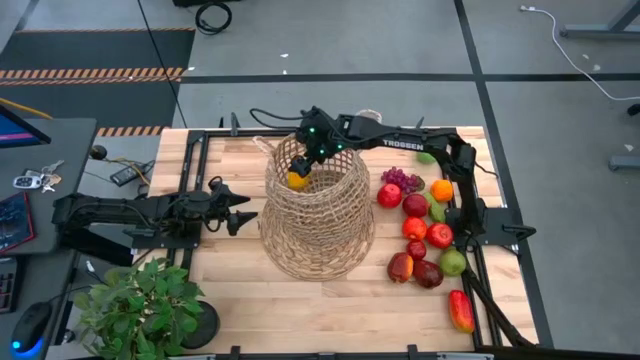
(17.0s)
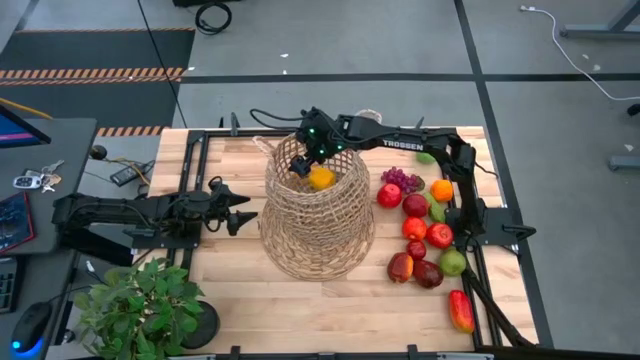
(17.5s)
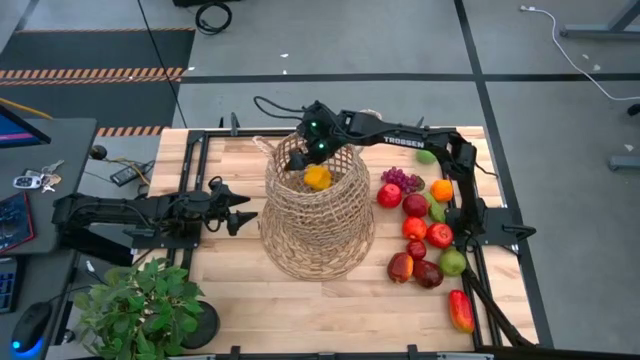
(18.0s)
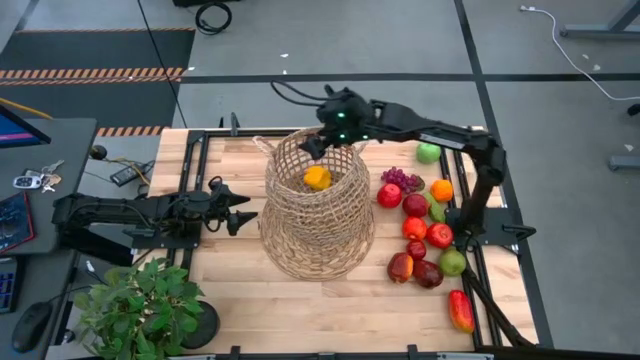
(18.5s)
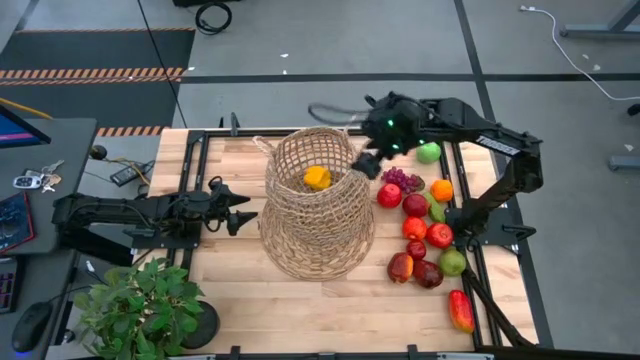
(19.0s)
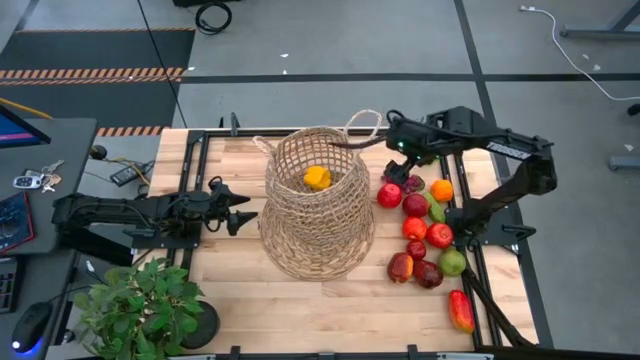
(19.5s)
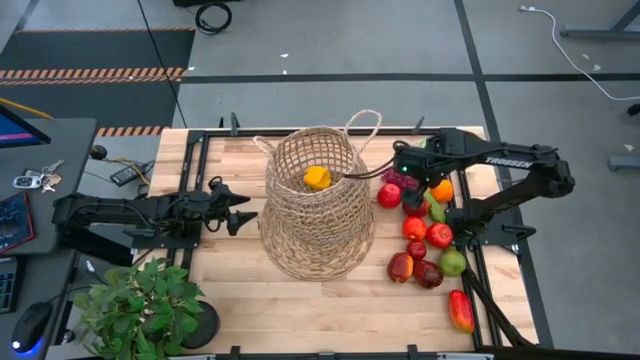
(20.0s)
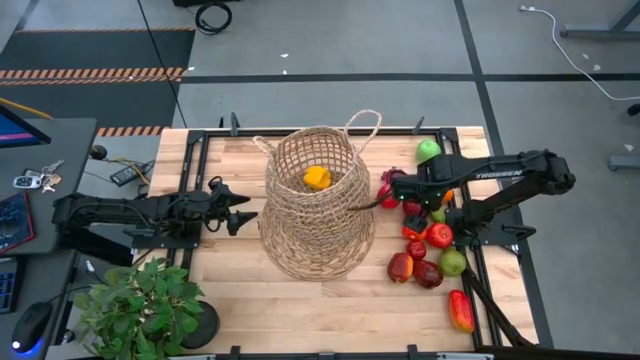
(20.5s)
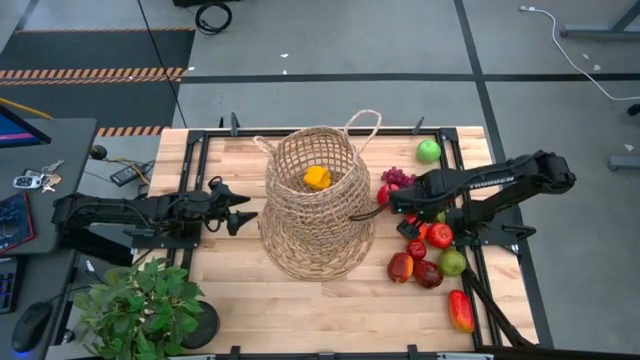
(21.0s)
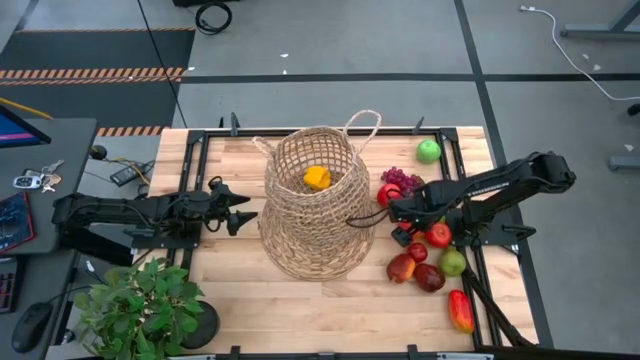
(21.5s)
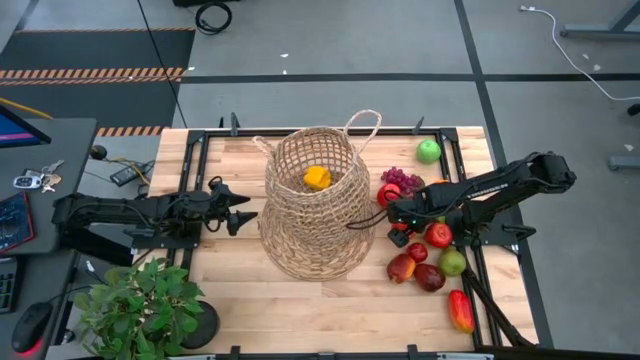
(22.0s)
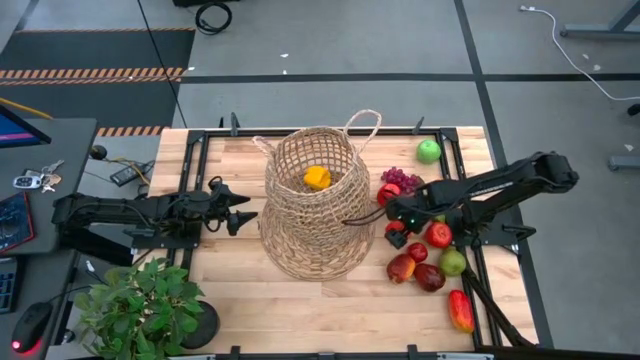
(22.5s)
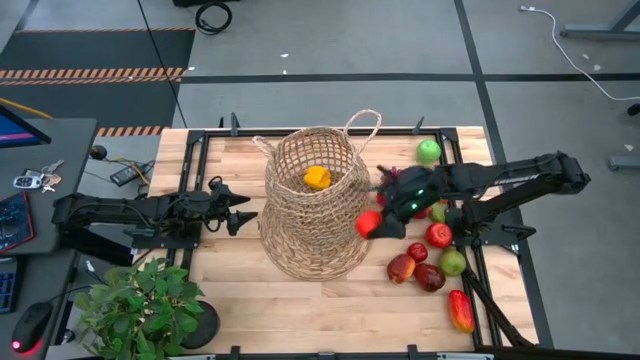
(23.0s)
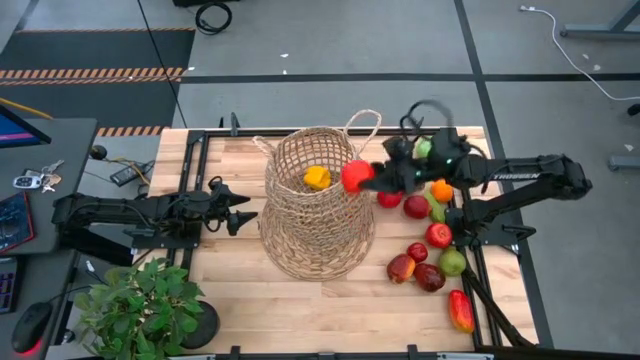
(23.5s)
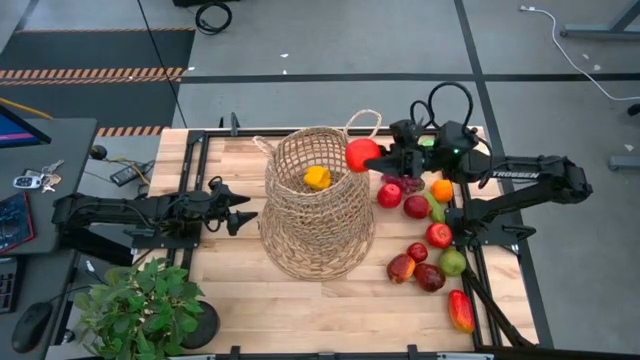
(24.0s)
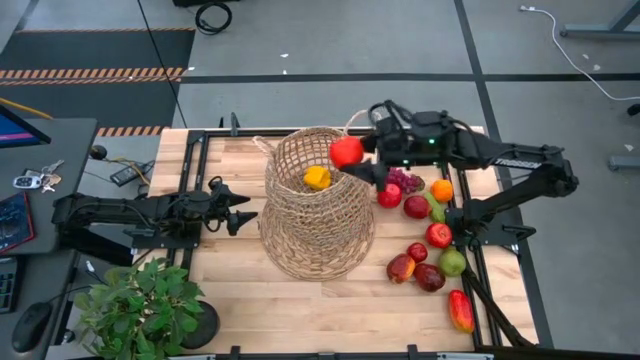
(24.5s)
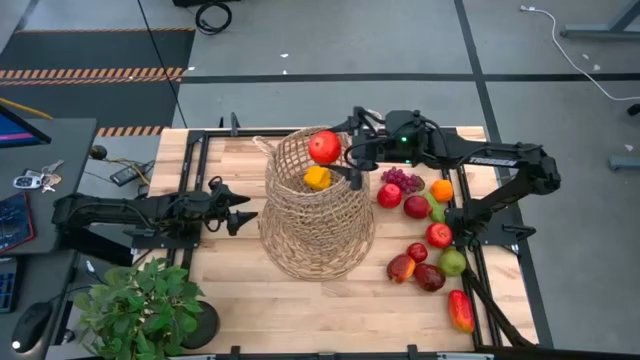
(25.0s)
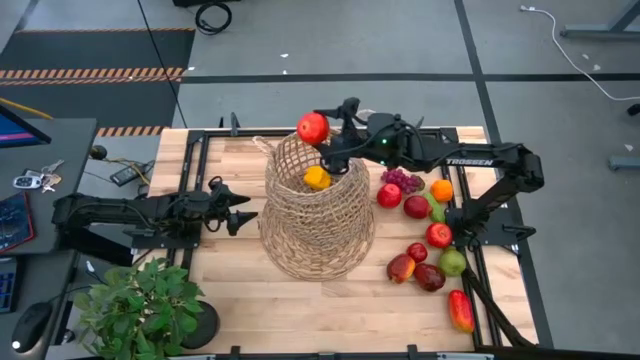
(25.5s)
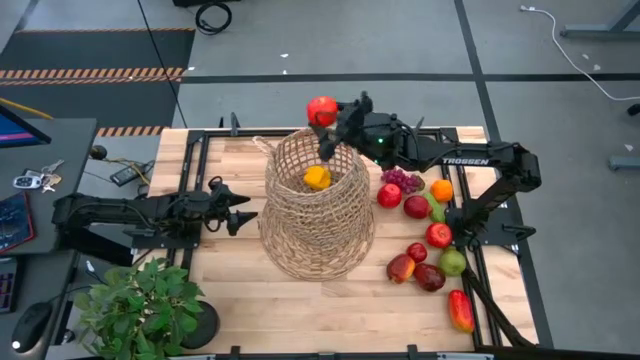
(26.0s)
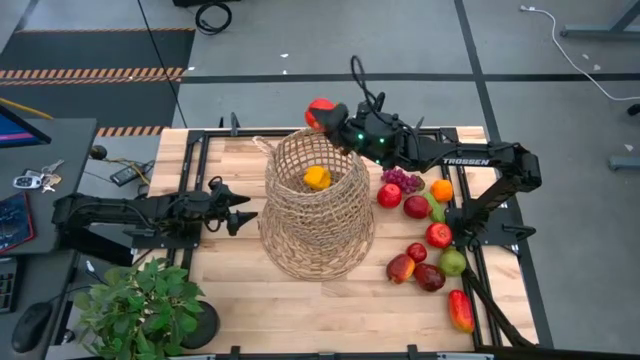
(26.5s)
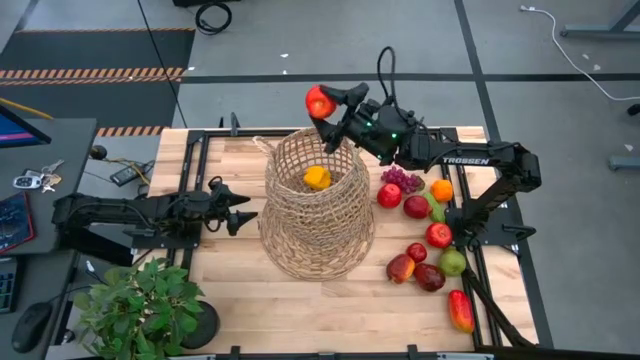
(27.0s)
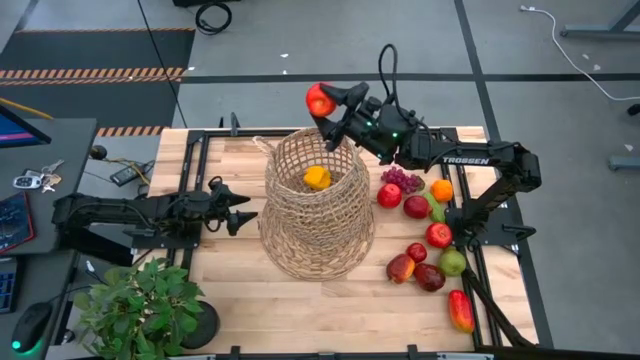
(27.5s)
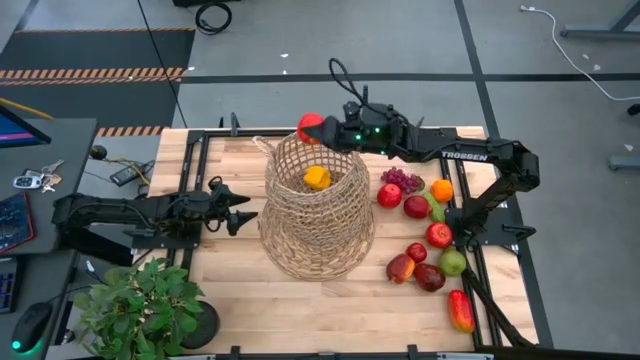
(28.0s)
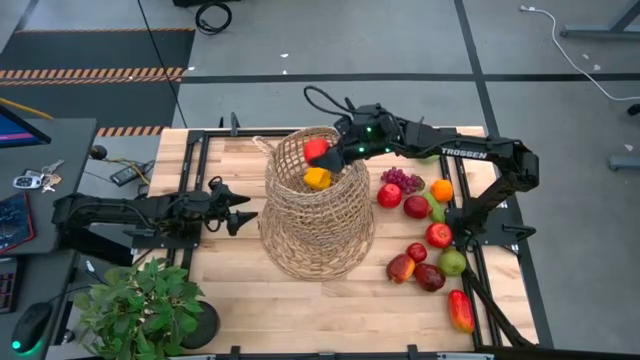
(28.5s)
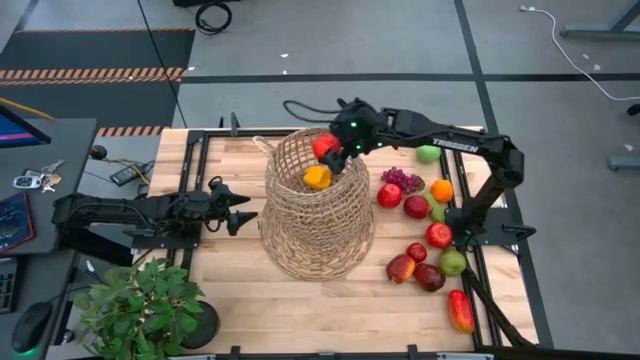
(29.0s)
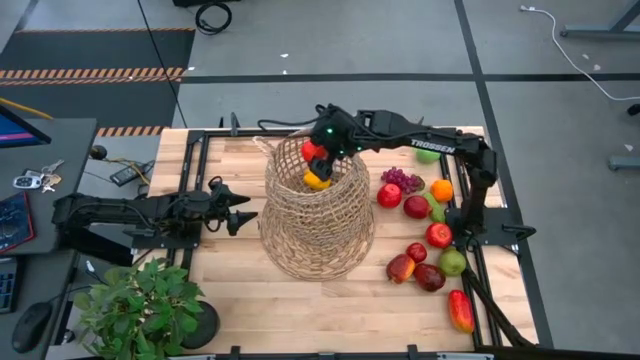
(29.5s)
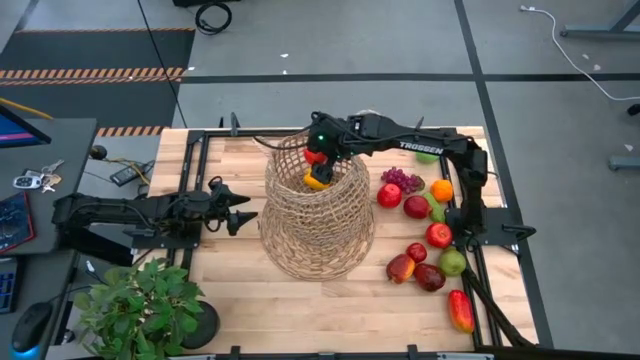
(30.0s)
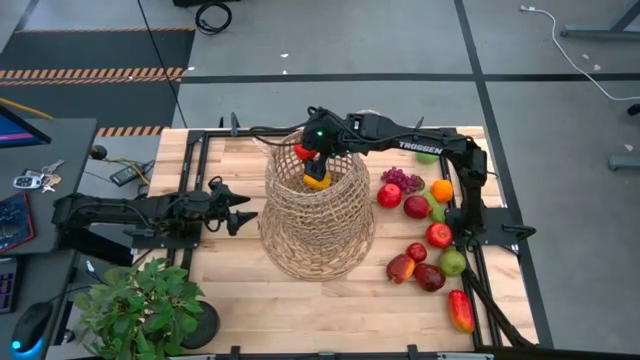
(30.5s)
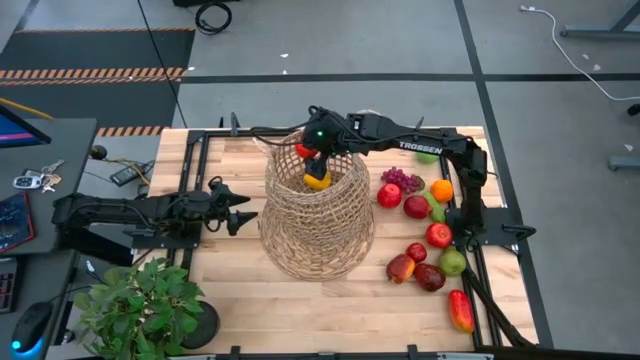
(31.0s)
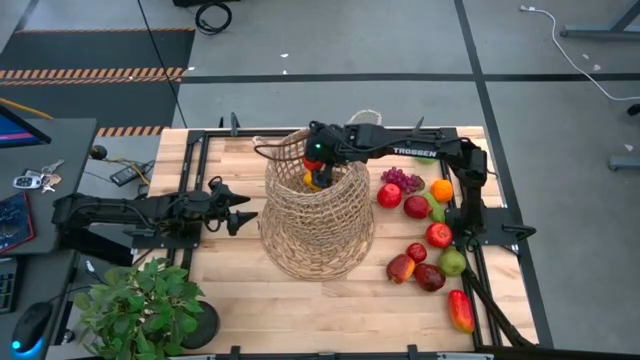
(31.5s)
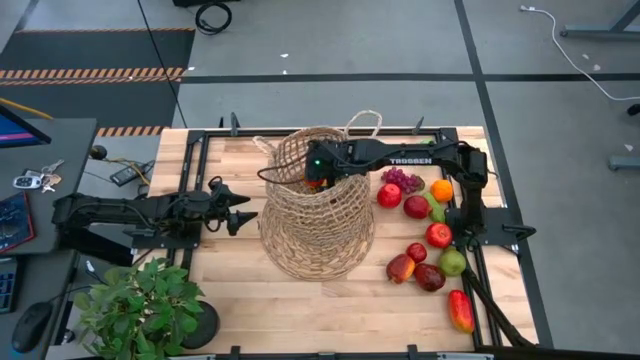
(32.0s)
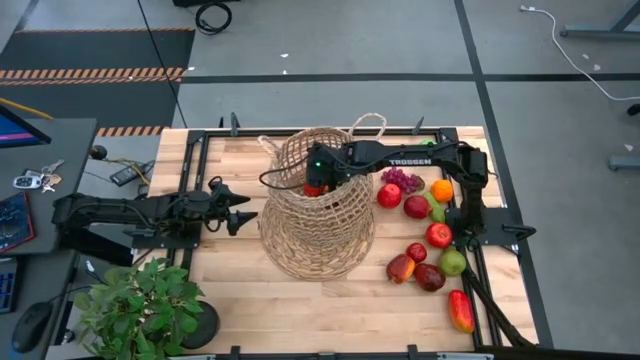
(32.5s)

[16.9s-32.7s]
Task: Build produce basket
Put the red apple into the brown basket

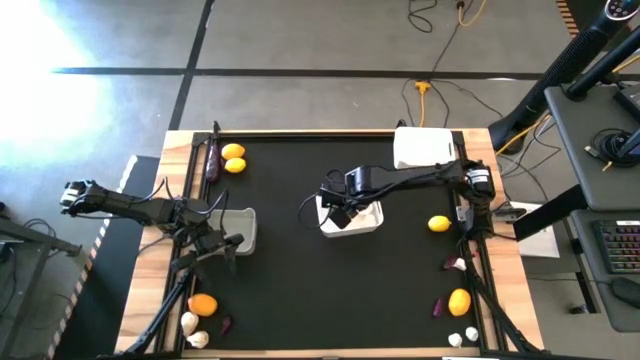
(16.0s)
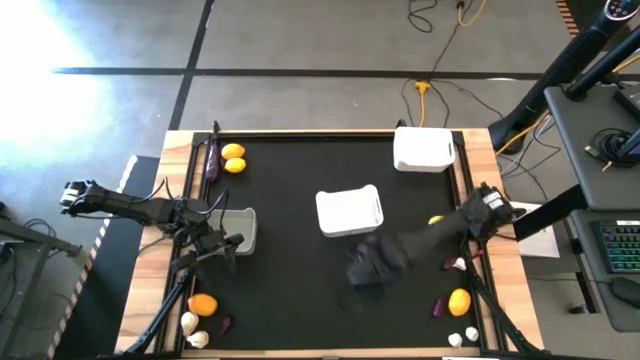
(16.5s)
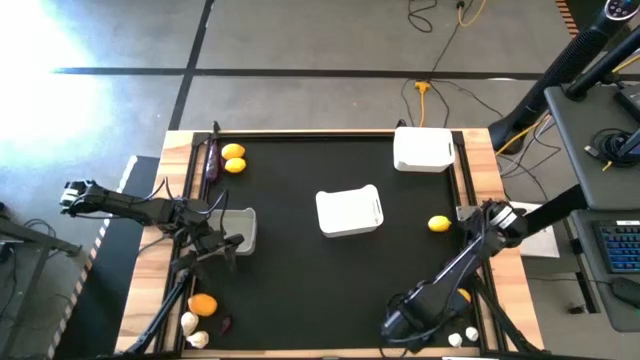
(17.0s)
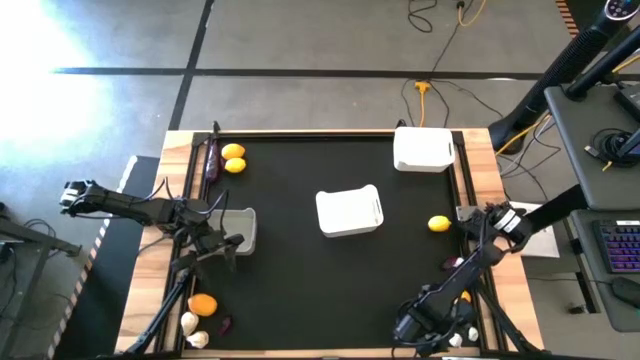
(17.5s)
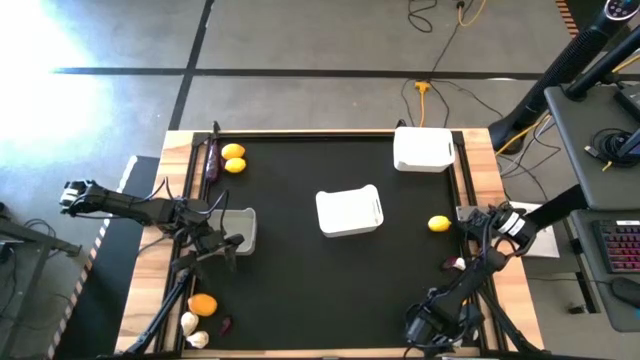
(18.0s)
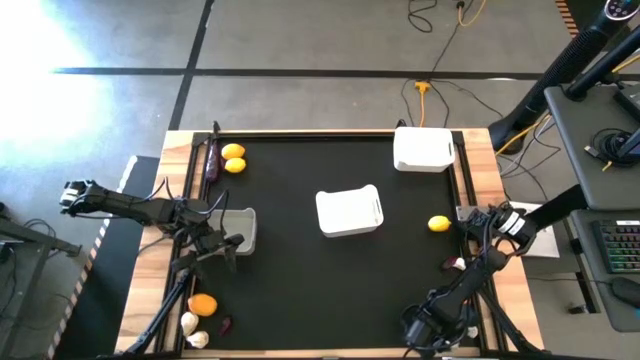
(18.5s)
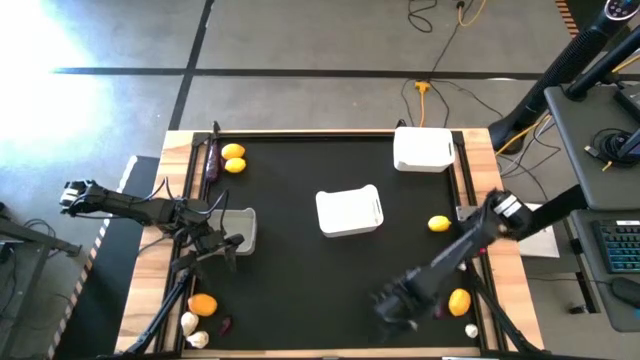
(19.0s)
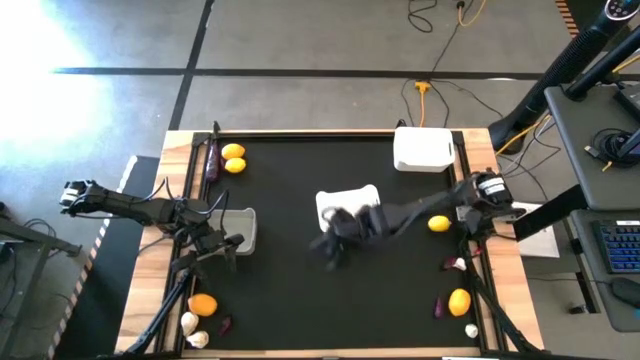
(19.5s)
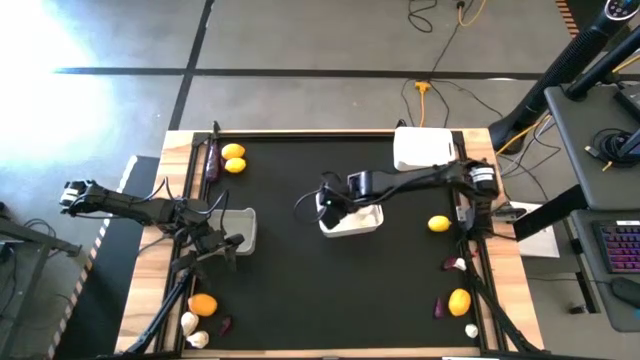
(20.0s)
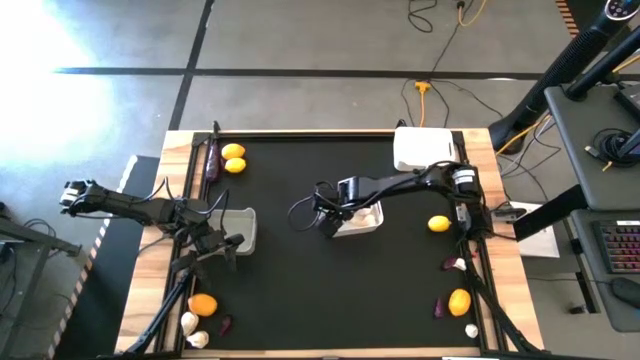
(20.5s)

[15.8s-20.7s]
Task: Sort produce into baskets
Put the white garlic into the bottom white bin
